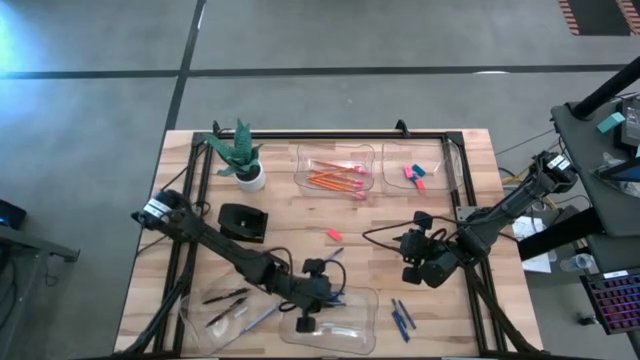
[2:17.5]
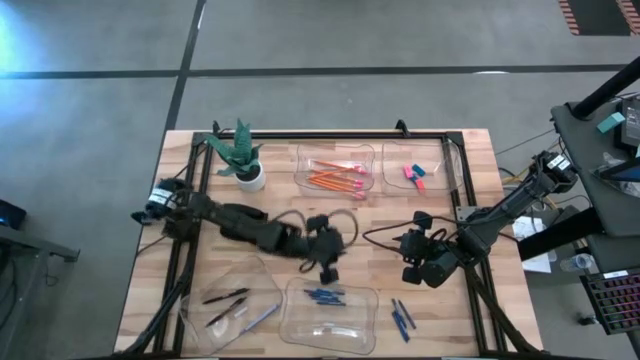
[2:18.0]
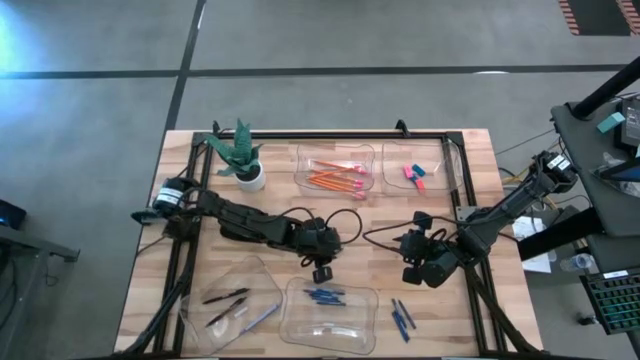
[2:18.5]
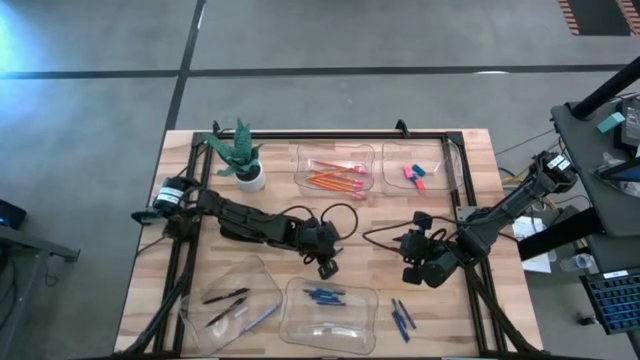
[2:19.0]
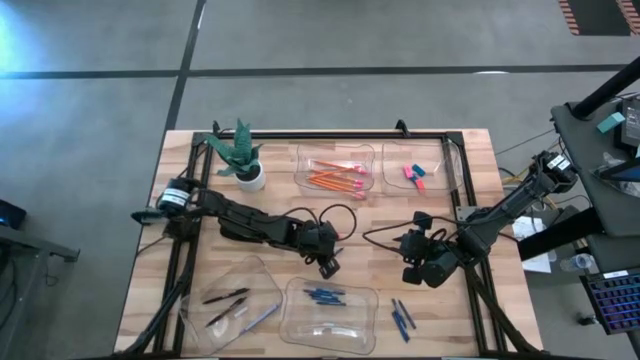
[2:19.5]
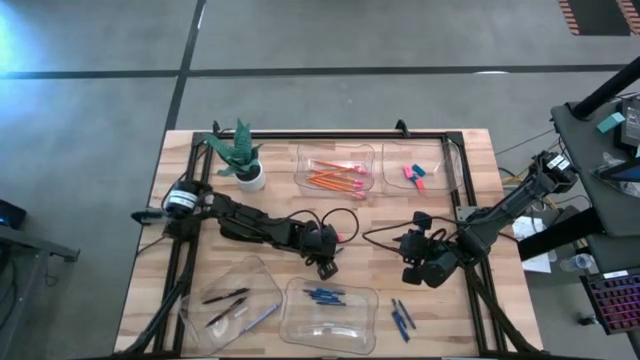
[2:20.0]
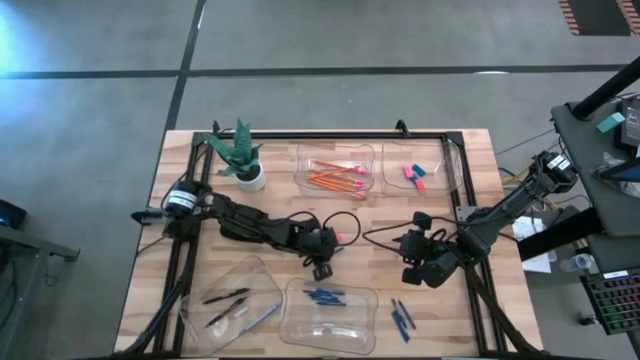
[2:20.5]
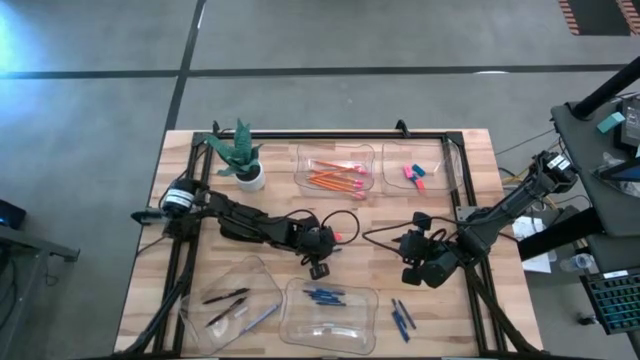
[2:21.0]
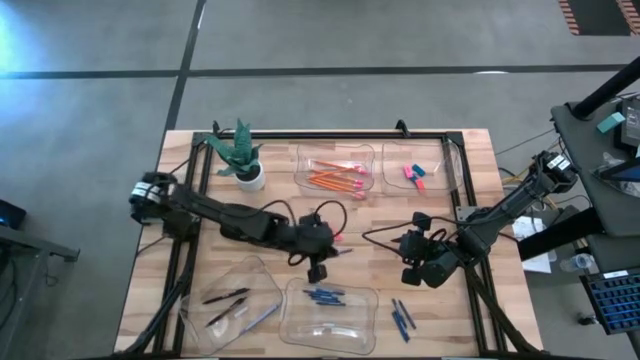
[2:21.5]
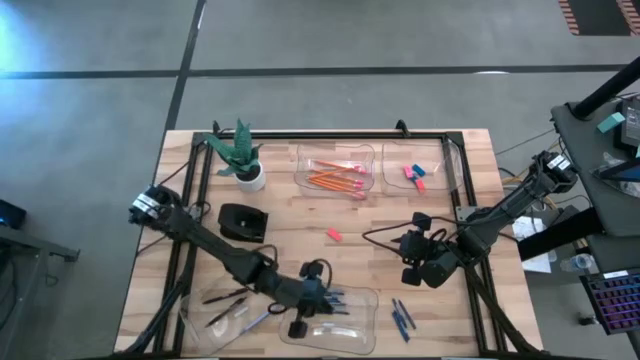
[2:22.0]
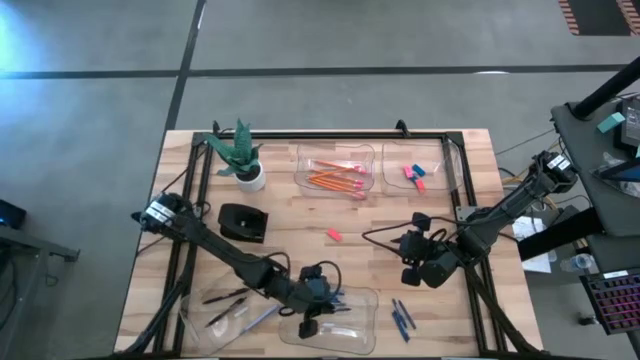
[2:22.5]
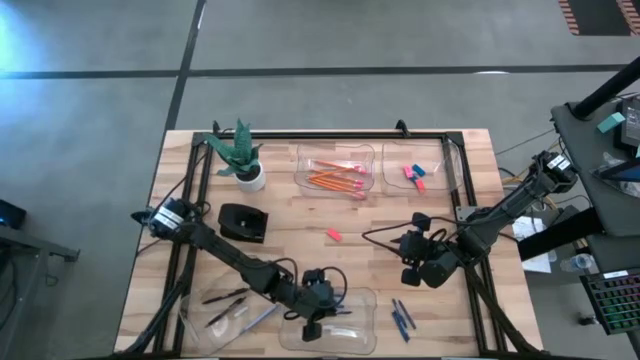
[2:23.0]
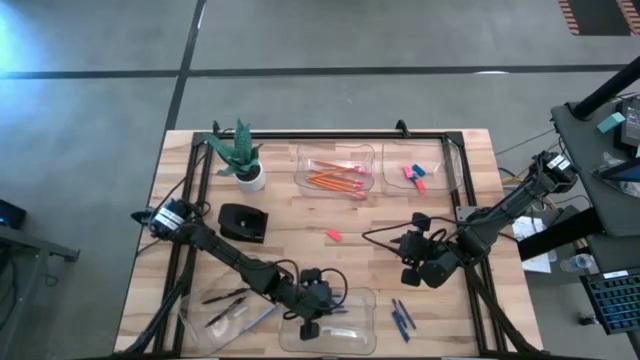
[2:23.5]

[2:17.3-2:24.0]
Task: Sort crayons/erasers/pens/pencils in bins
Put the blue crayon into the bottom right transparent bin

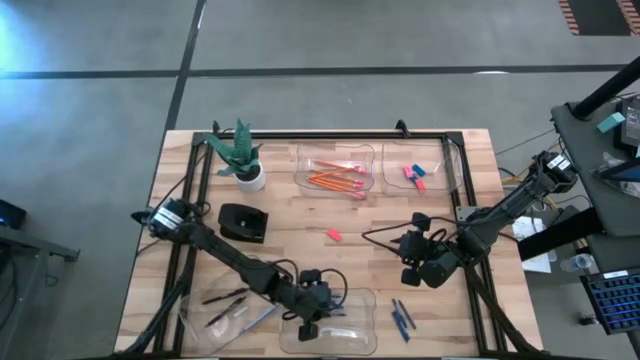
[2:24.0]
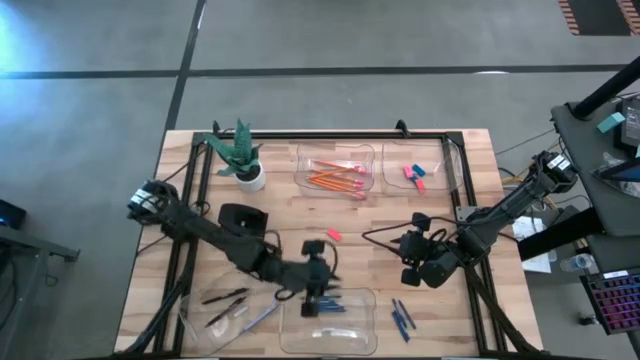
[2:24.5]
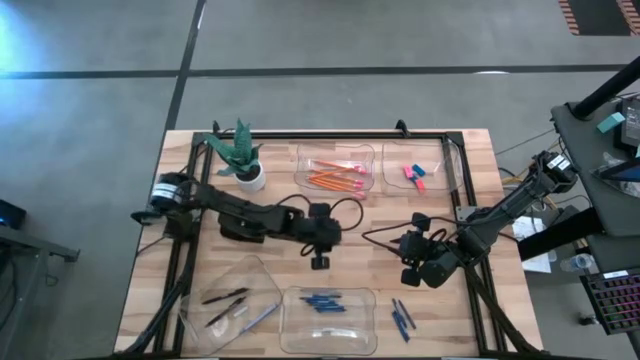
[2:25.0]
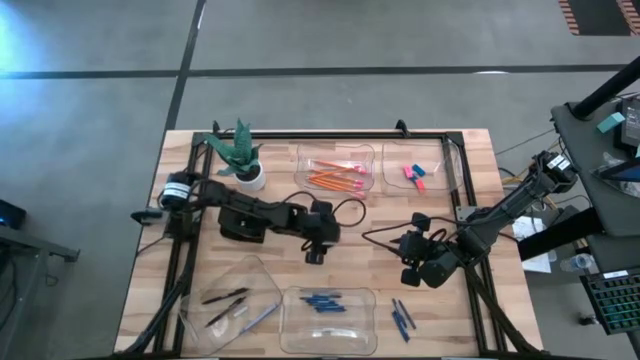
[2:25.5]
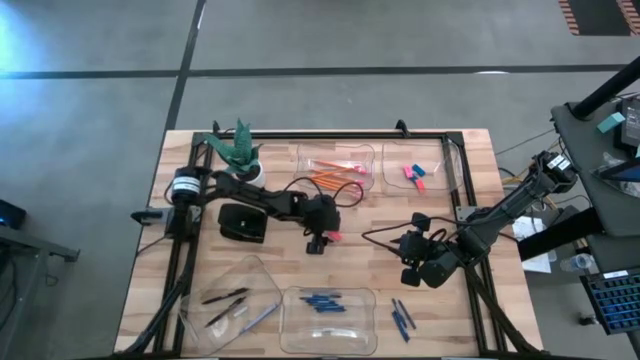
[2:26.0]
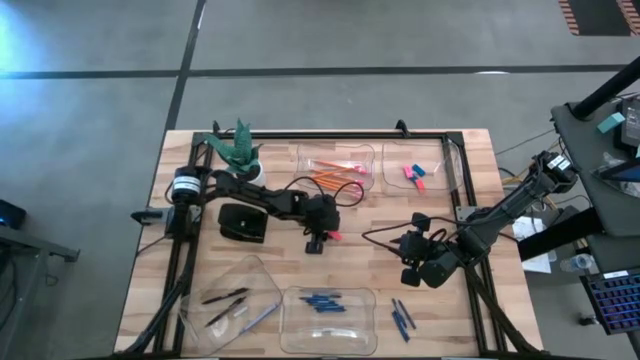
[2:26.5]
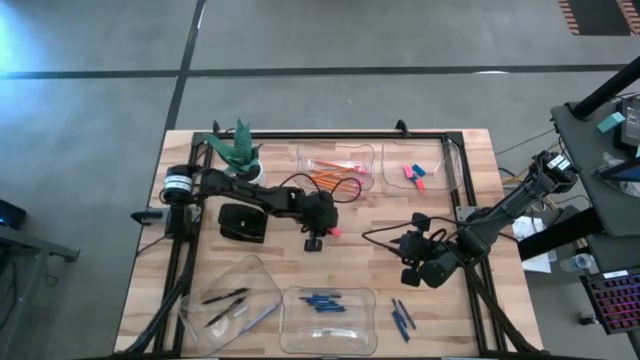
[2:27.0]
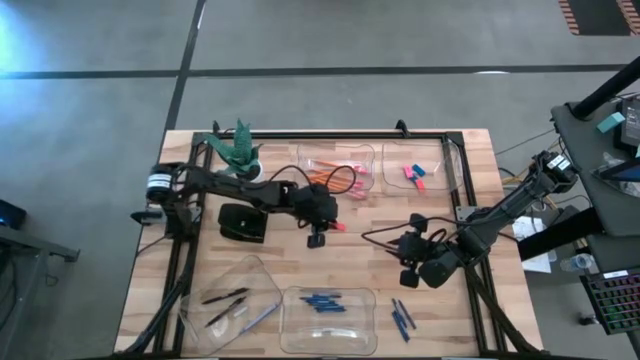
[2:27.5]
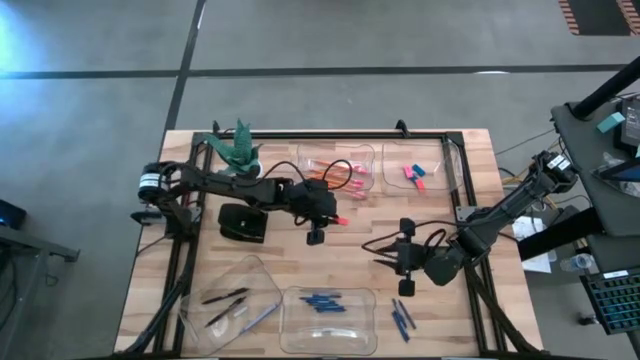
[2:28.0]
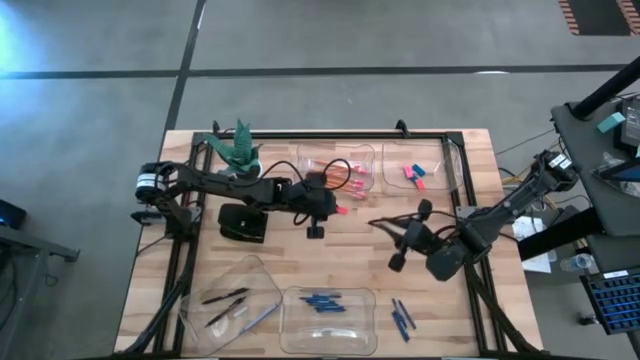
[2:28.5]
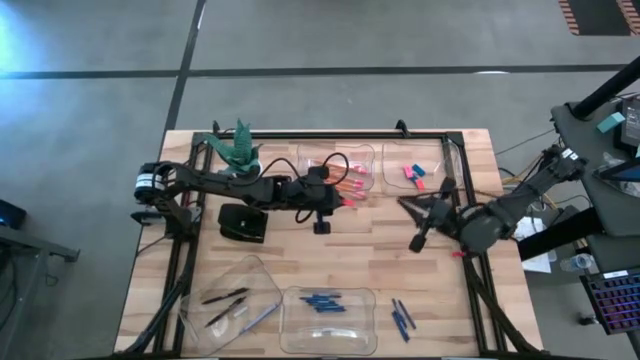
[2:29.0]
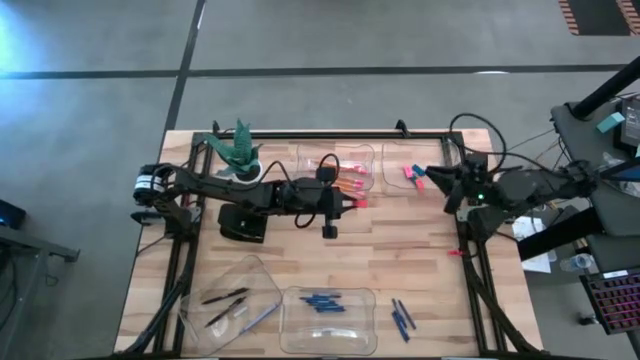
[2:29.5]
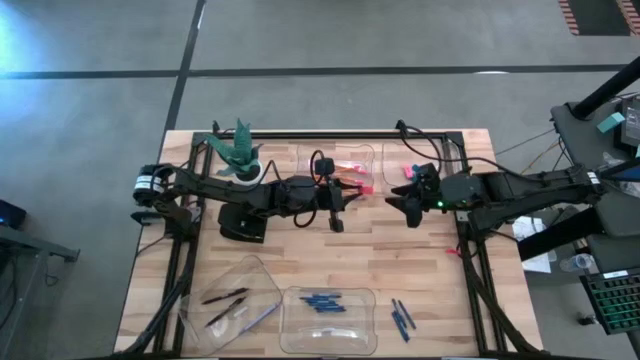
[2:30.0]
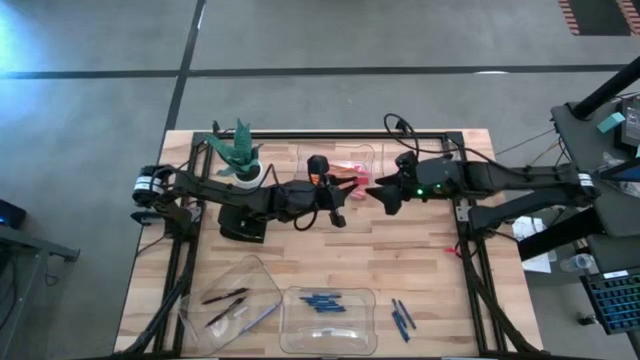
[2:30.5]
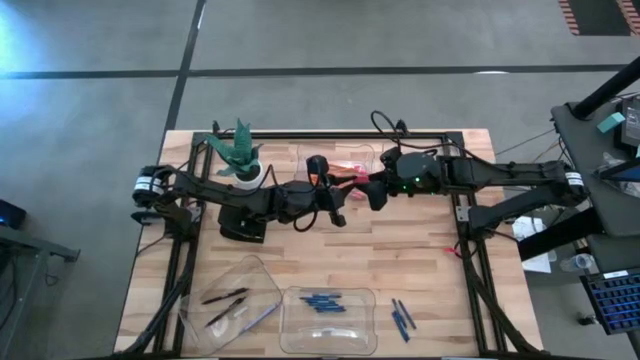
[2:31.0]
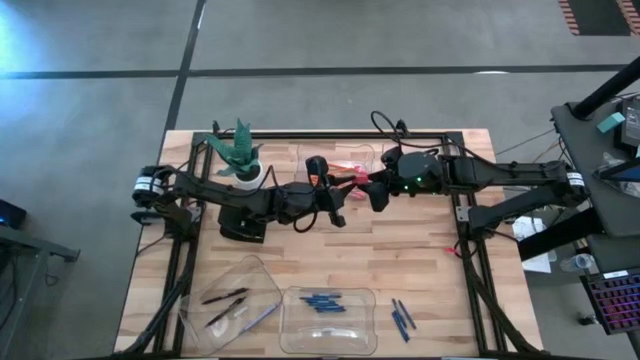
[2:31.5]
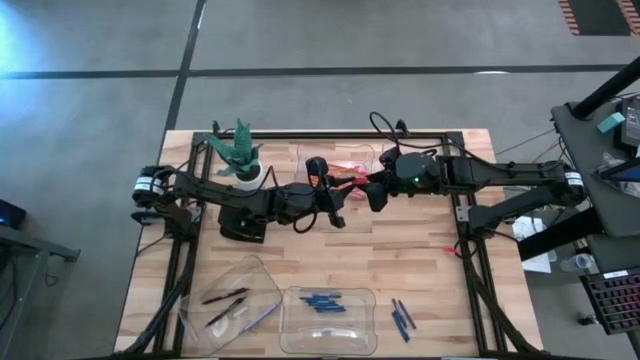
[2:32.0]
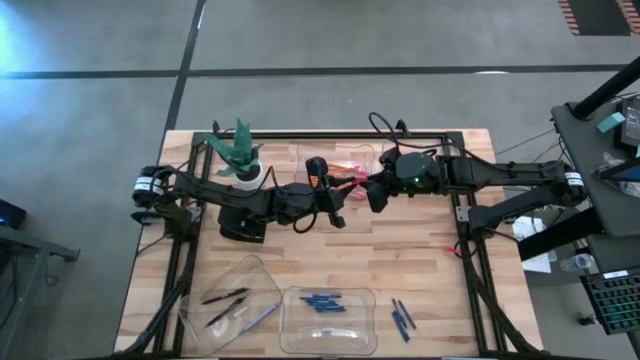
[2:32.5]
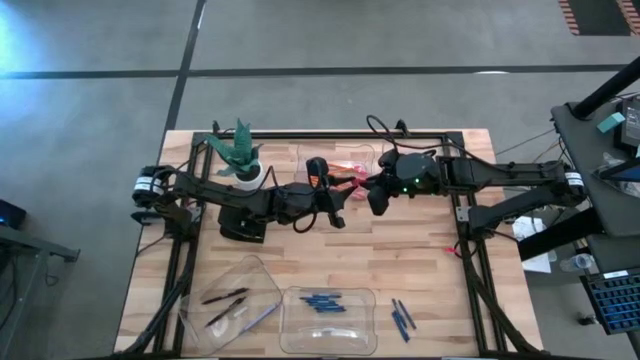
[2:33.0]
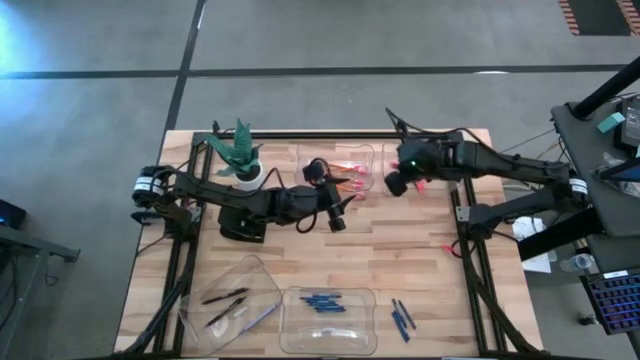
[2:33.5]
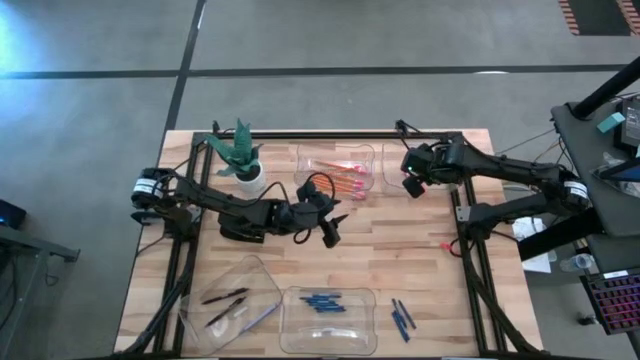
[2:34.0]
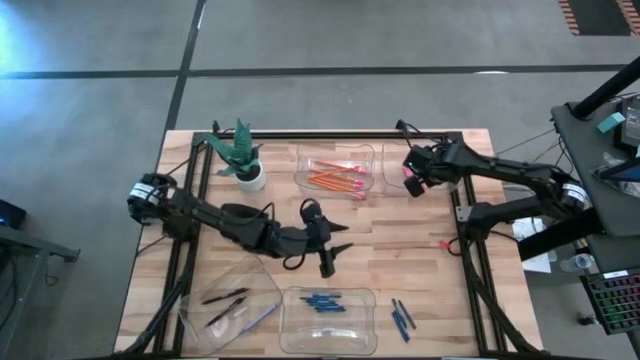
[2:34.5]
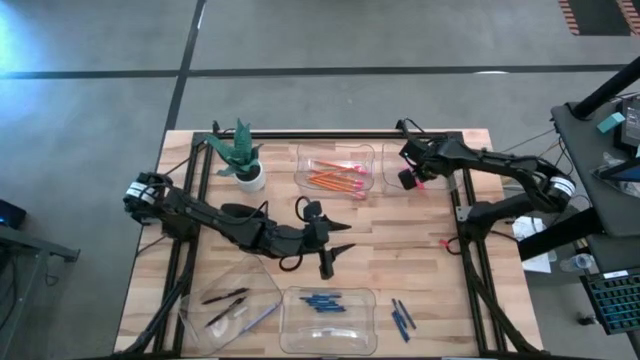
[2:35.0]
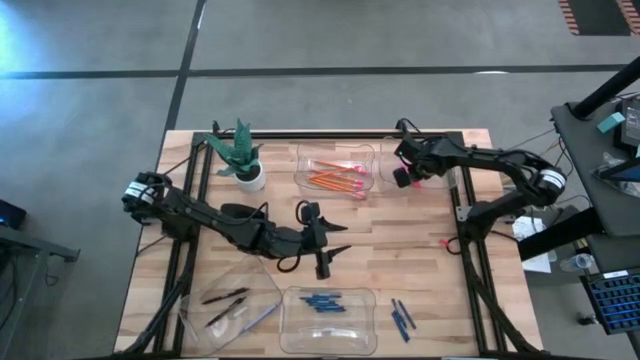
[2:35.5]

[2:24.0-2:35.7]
Put the orange eraser into the top right transparent bin

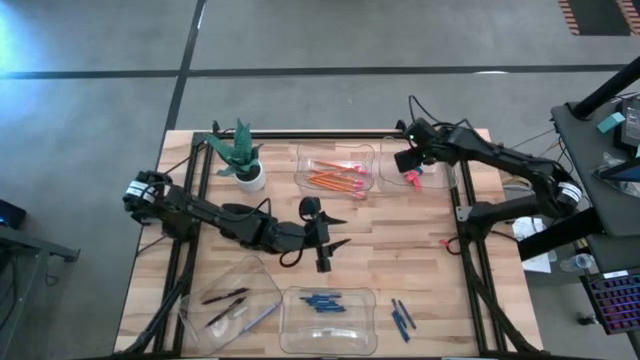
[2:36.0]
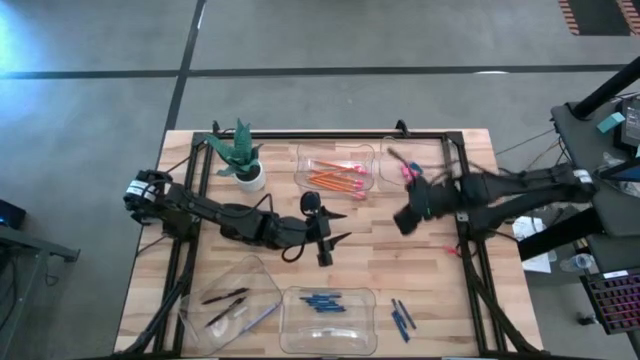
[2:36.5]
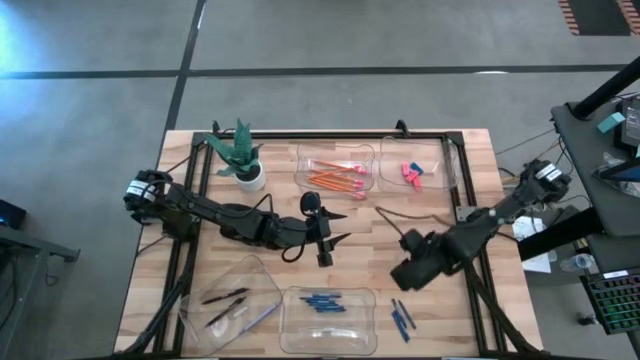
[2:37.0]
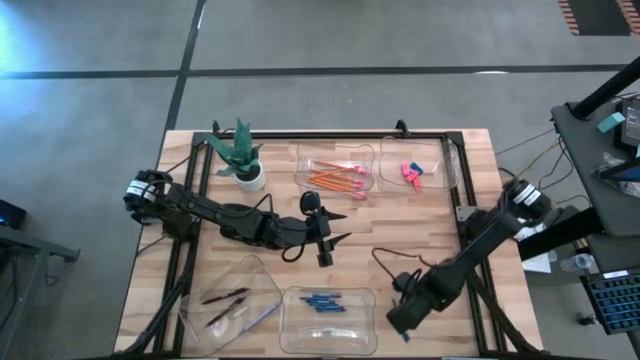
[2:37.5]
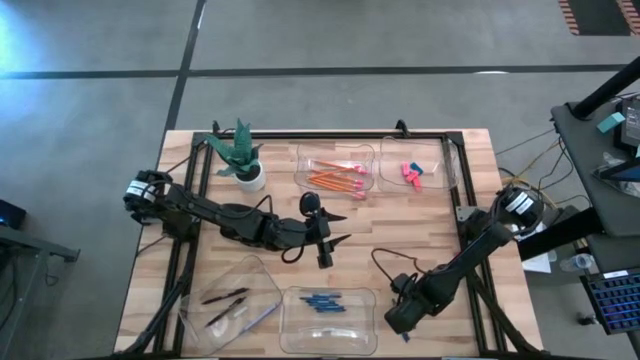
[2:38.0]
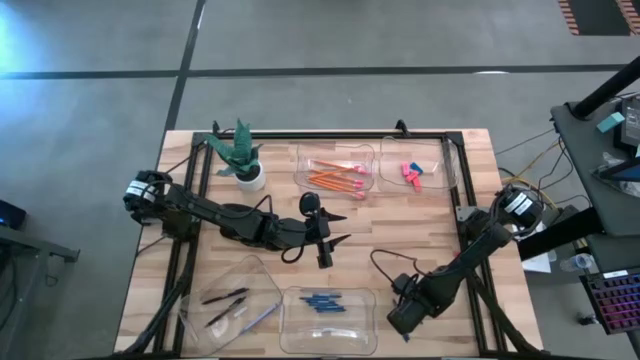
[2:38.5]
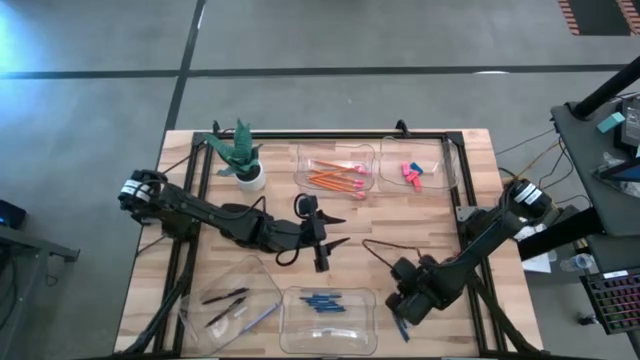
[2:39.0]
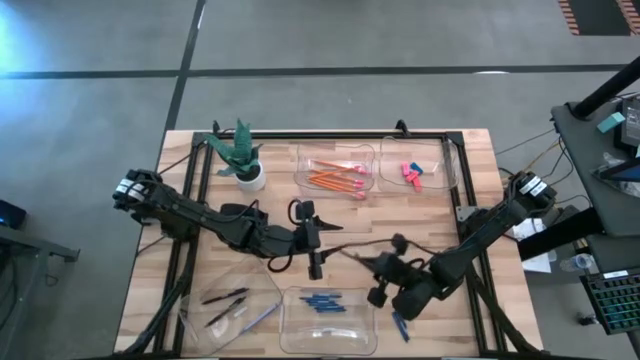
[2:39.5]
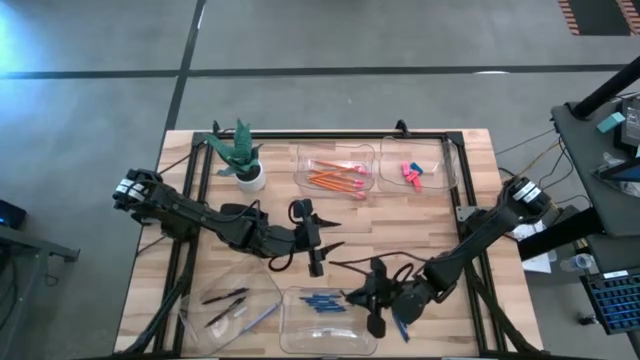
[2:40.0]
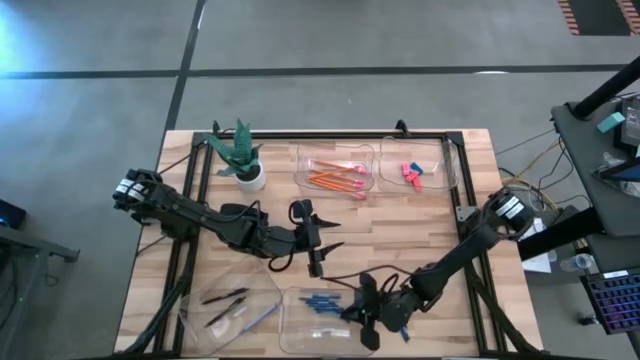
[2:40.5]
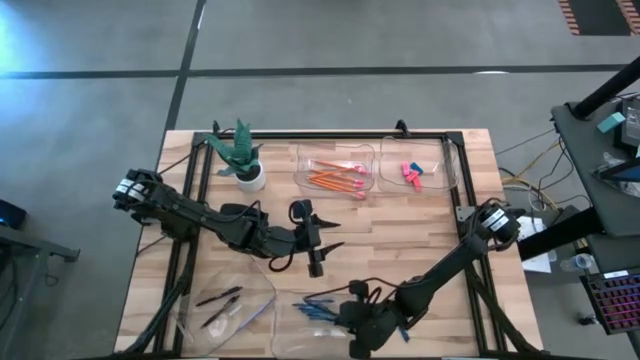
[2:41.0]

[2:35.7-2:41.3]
Put the blue crayon into the bottom right transparent bin
